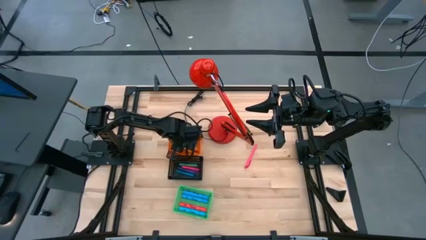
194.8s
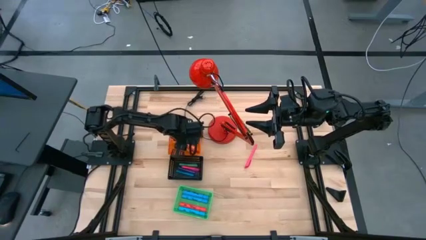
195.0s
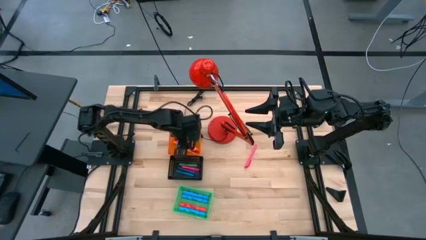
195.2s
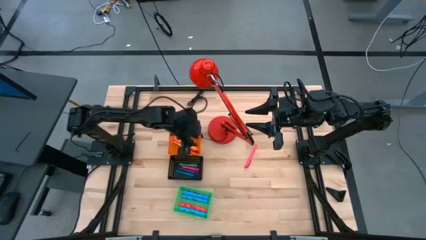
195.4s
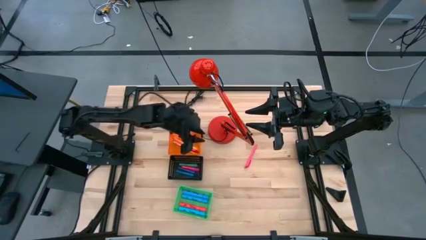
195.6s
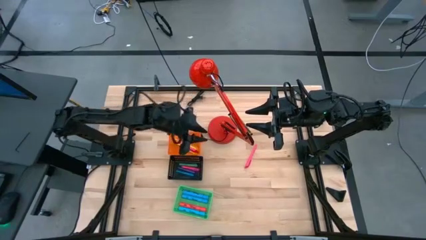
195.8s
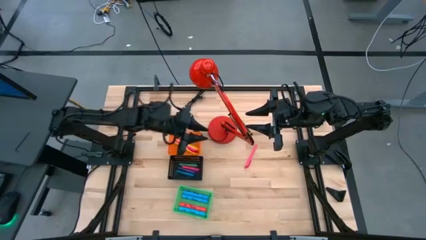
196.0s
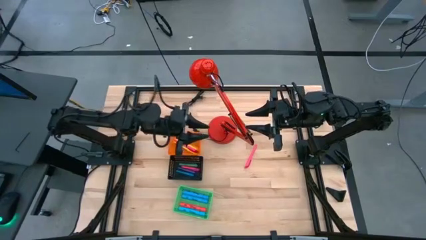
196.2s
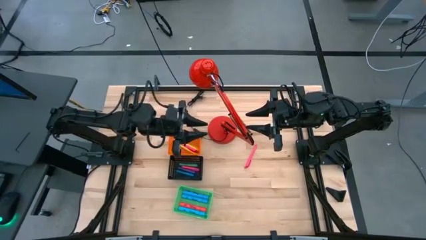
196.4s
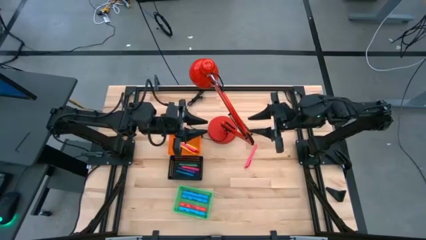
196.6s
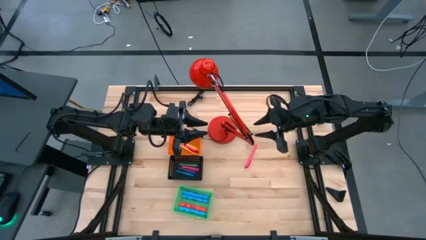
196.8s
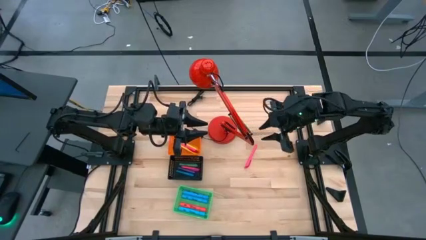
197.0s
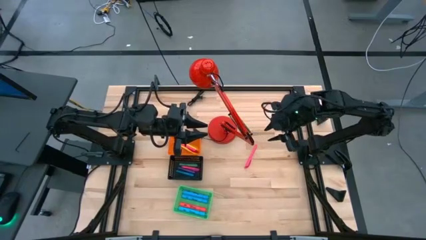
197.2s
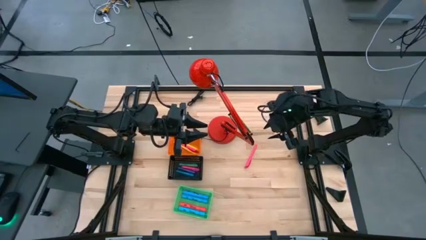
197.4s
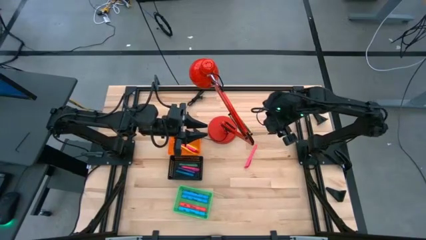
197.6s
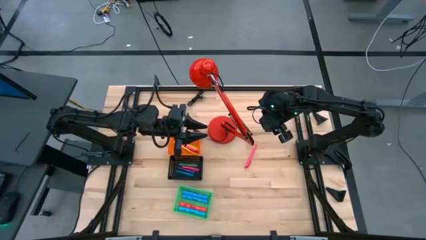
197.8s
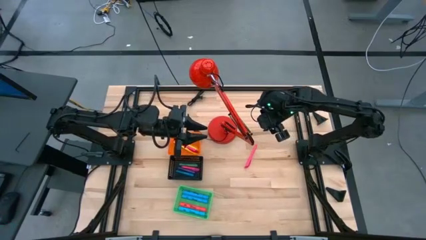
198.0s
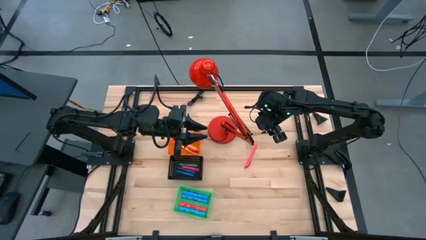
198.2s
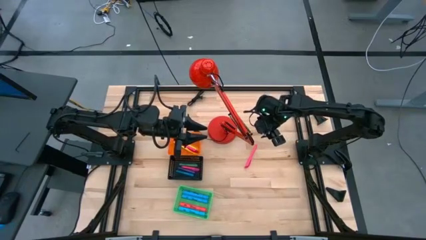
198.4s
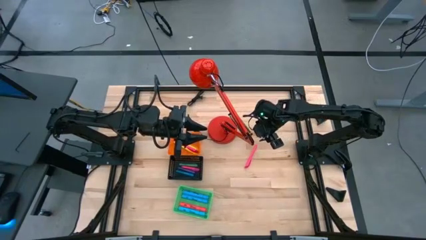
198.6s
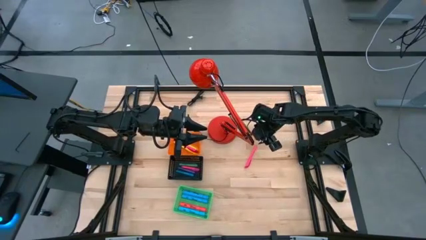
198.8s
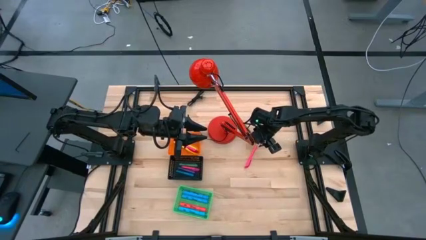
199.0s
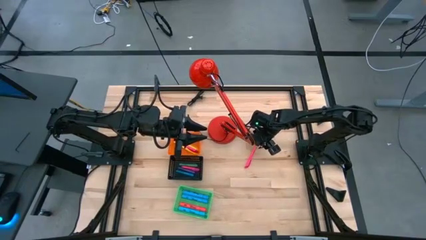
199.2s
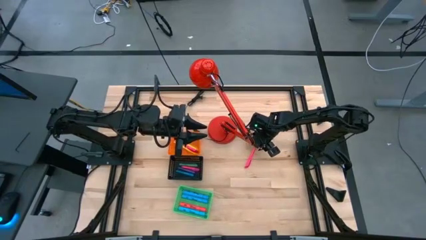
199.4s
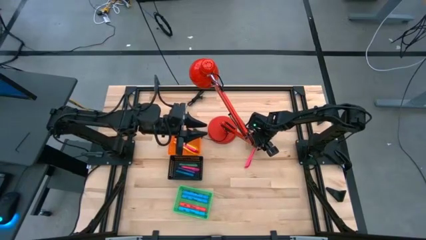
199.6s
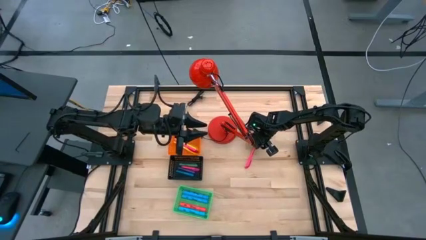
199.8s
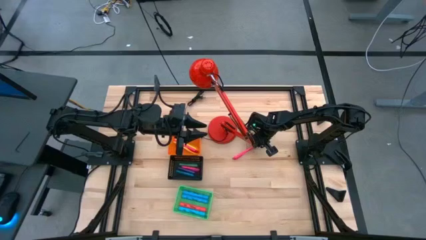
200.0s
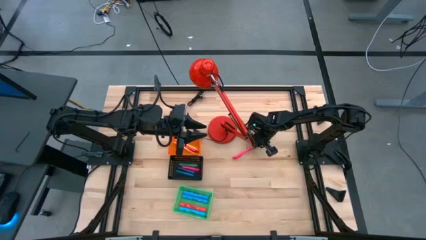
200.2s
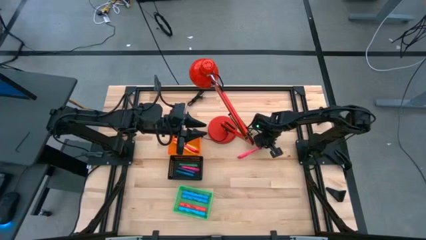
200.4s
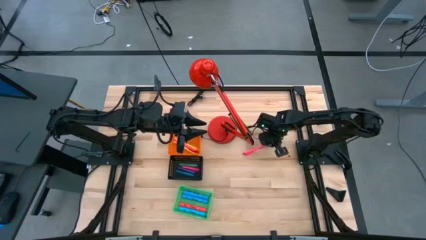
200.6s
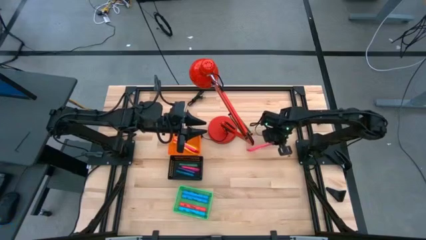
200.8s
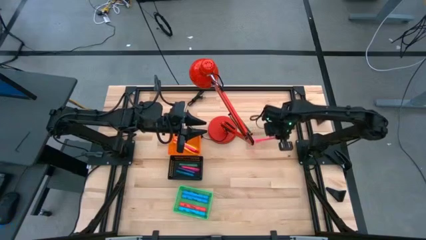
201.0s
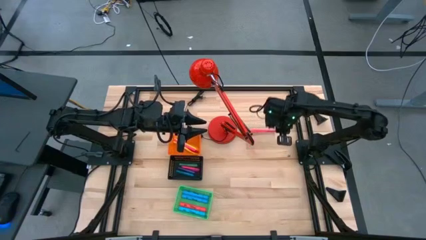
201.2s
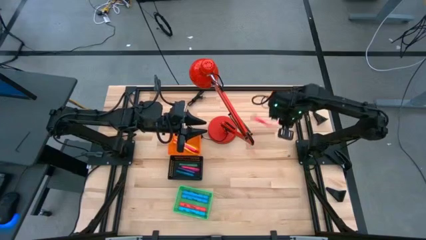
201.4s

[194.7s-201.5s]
Task: Pick & Place Markers
Put the pink pen into the orange bin

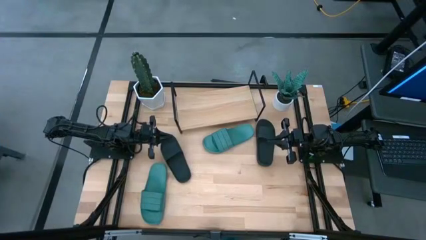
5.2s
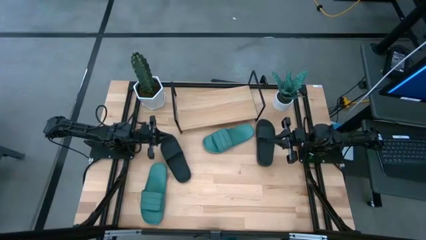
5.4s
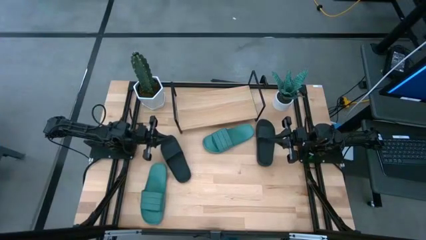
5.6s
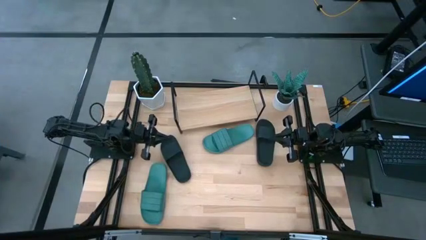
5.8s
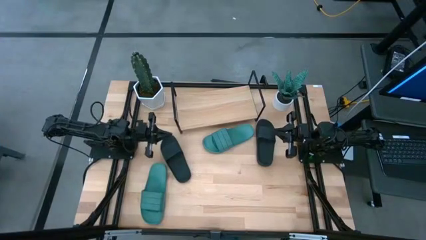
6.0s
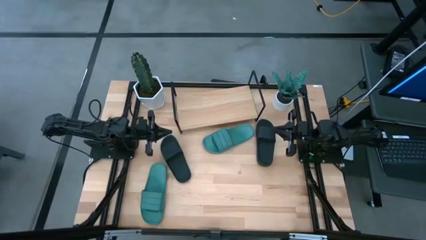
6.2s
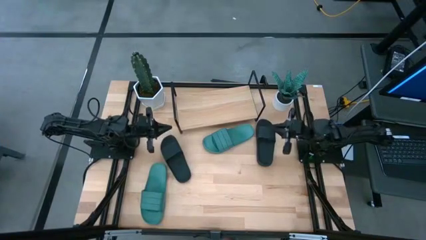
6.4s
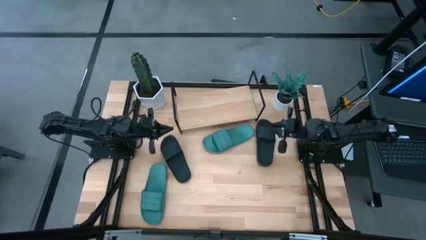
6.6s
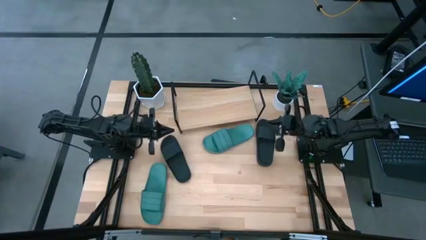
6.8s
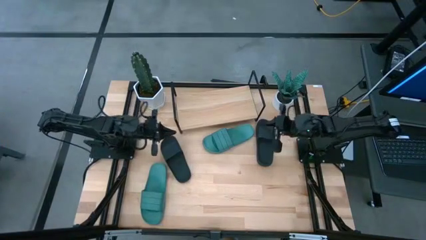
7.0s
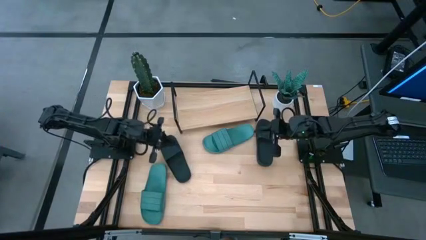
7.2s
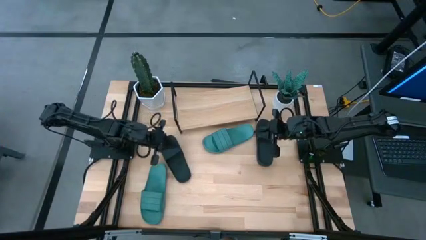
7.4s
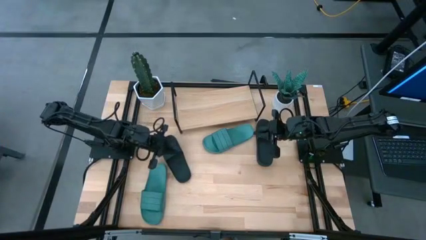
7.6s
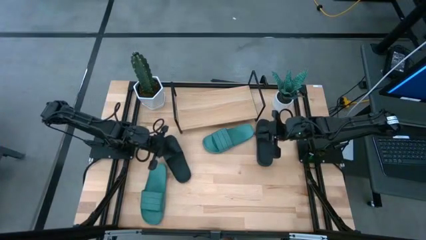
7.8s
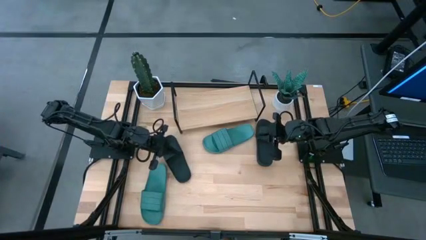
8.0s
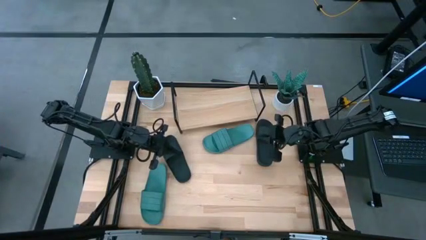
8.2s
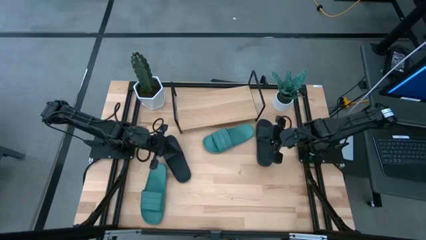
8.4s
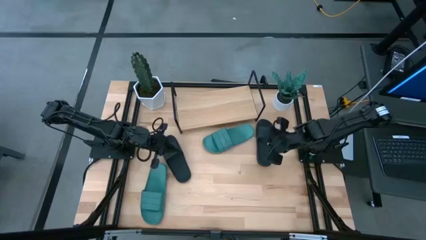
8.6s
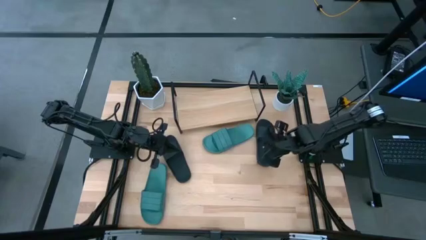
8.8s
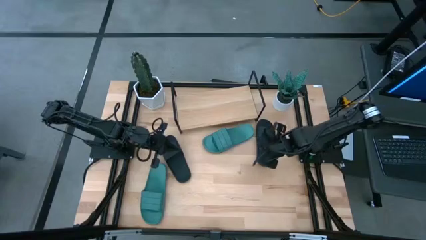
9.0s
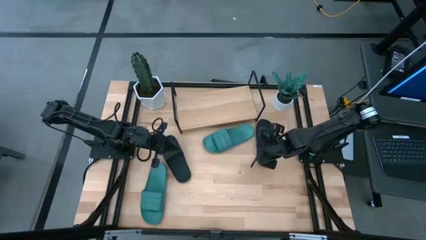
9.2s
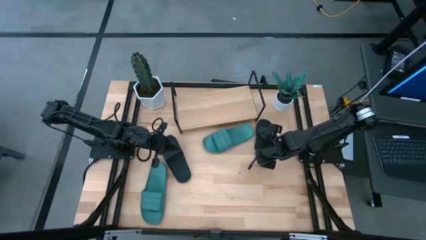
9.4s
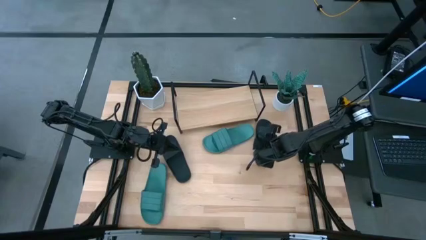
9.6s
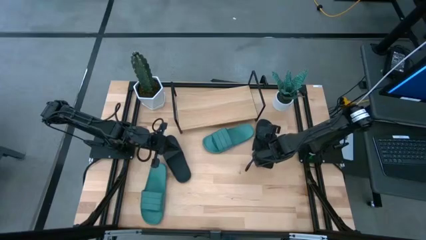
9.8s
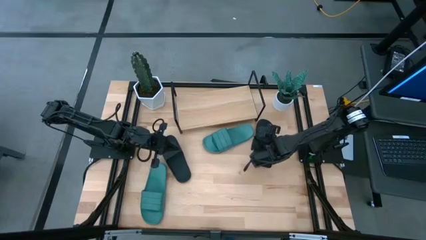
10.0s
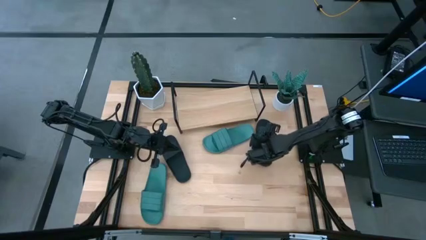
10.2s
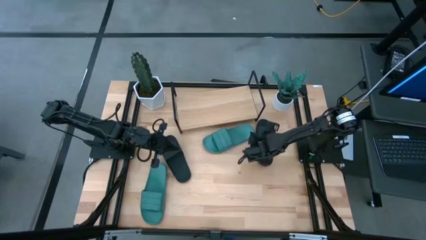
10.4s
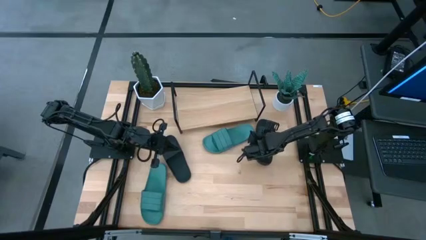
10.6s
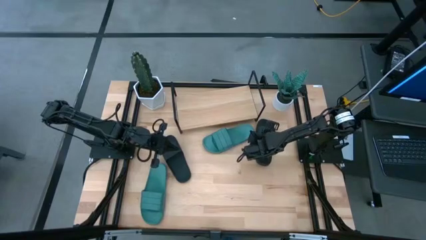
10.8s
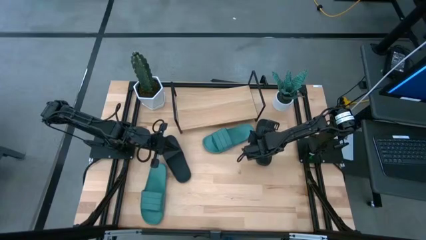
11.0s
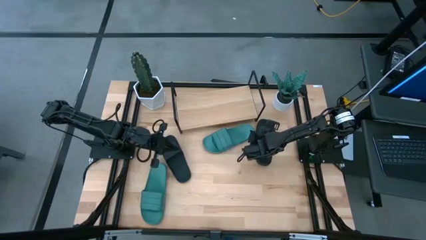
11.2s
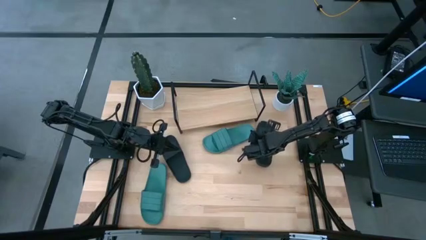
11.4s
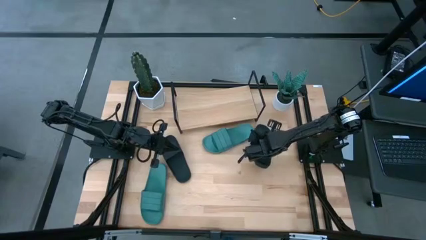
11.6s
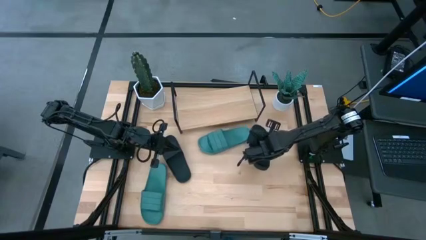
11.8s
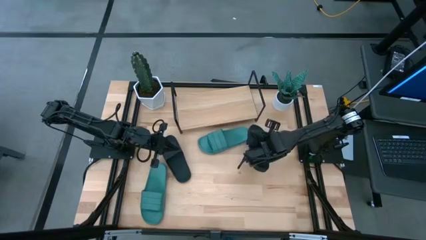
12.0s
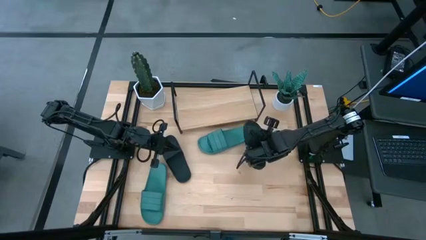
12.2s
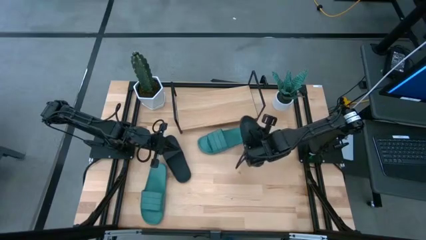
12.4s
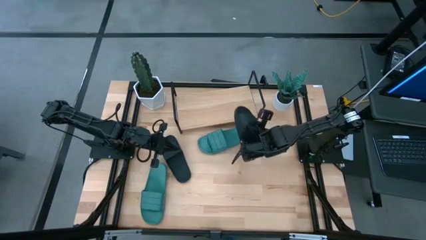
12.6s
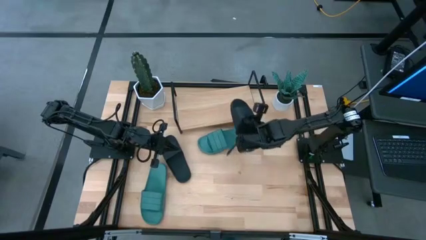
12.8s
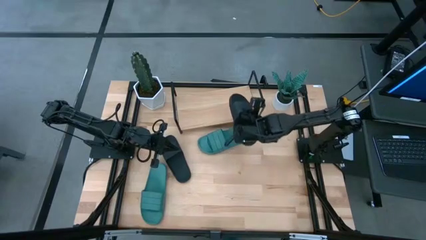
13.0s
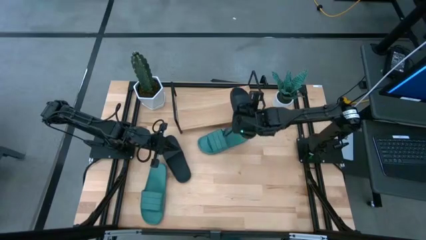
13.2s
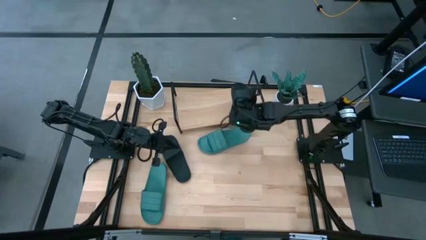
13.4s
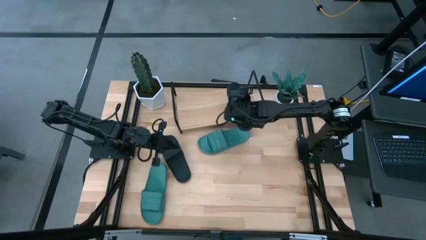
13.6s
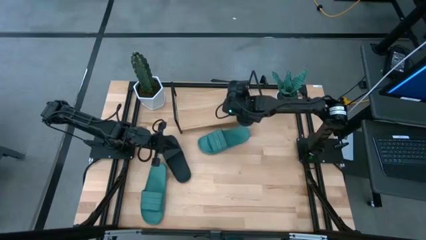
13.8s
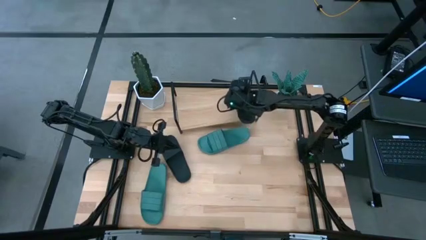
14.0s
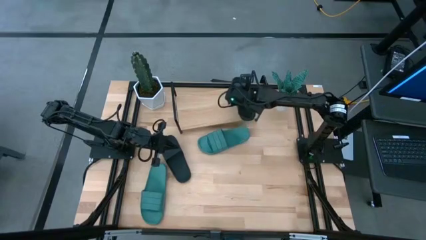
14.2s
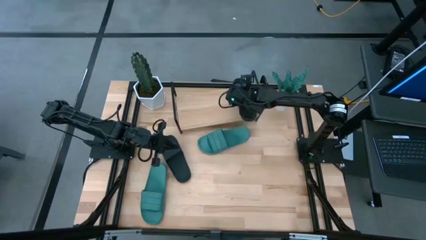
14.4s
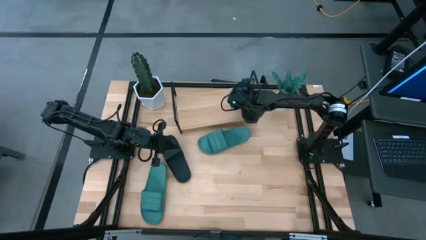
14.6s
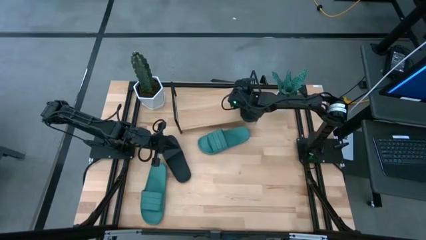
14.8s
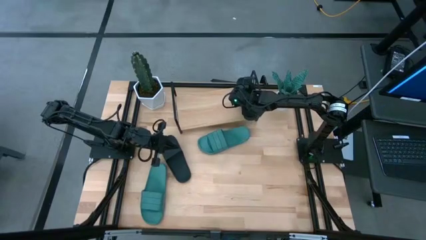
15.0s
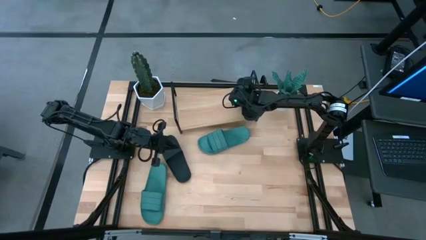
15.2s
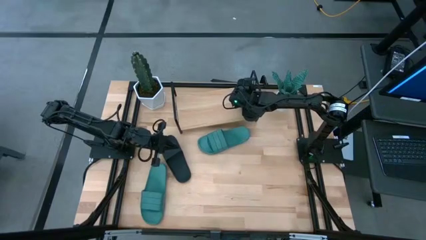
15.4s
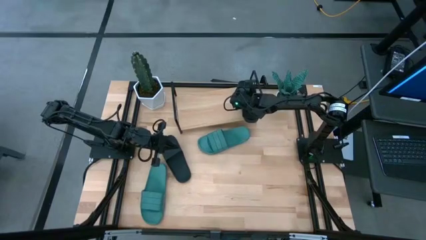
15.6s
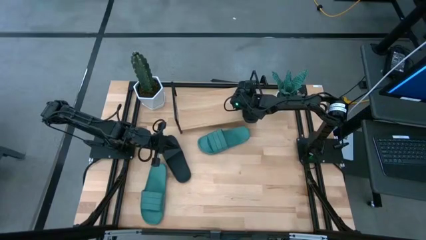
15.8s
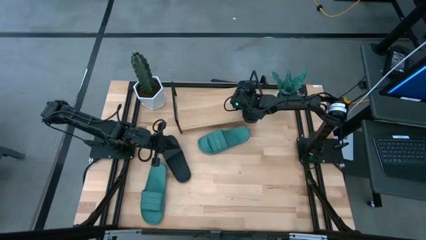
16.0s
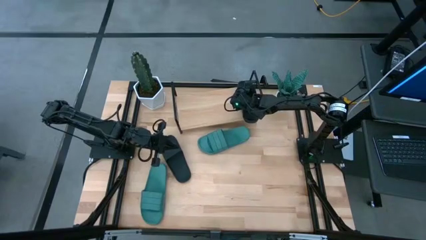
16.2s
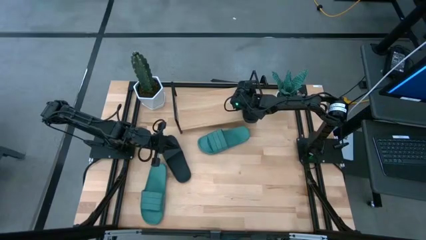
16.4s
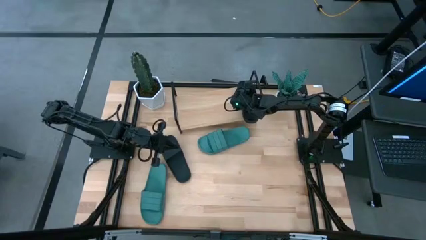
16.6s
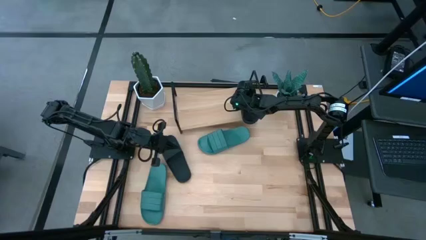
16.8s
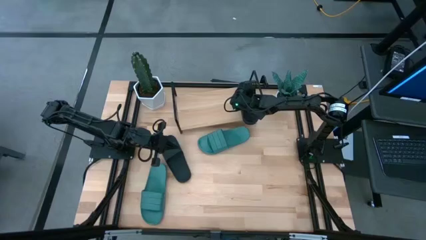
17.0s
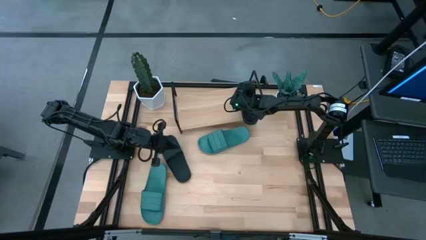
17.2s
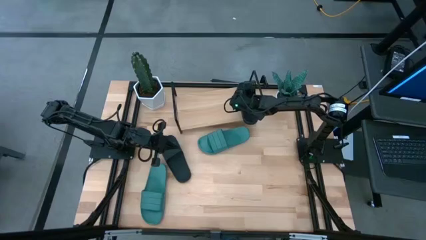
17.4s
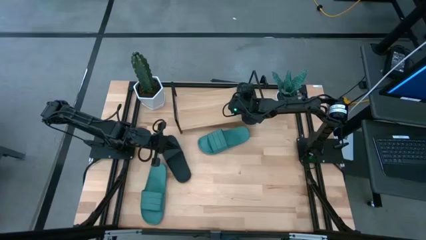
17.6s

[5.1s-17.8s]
Task: Pick and place slides into the shelf
Put the right black slide on the shelf
